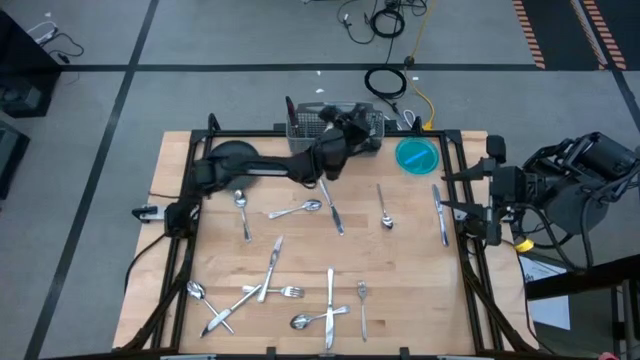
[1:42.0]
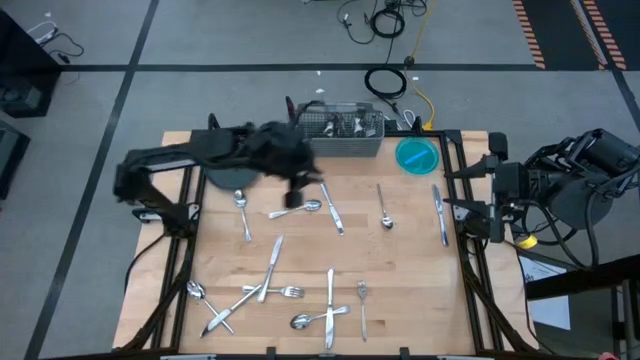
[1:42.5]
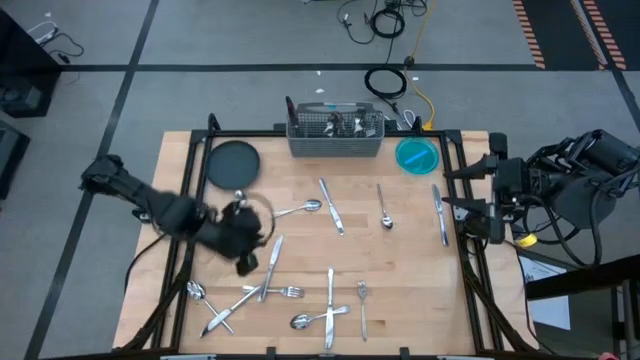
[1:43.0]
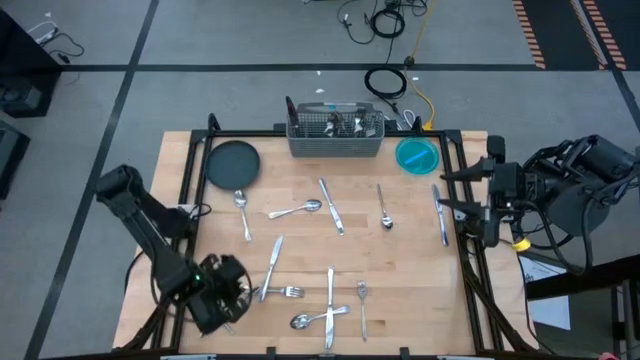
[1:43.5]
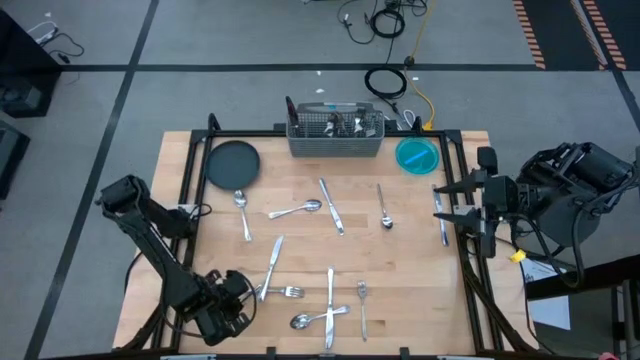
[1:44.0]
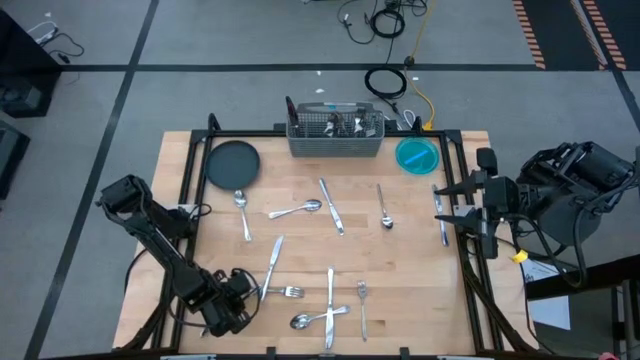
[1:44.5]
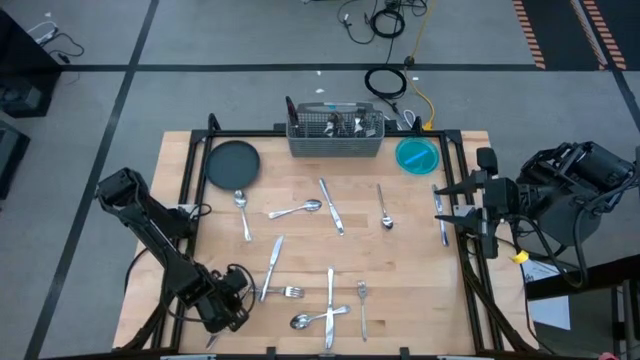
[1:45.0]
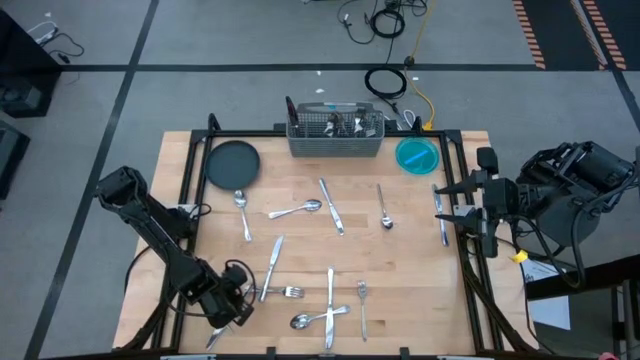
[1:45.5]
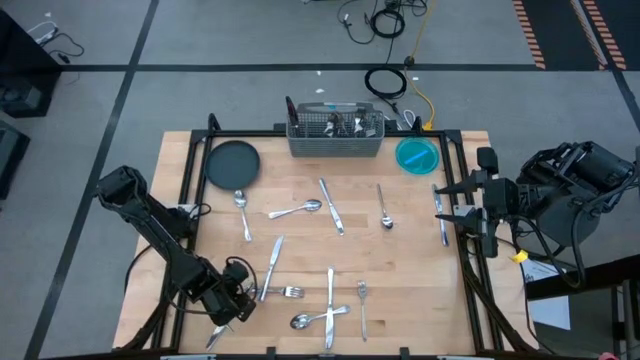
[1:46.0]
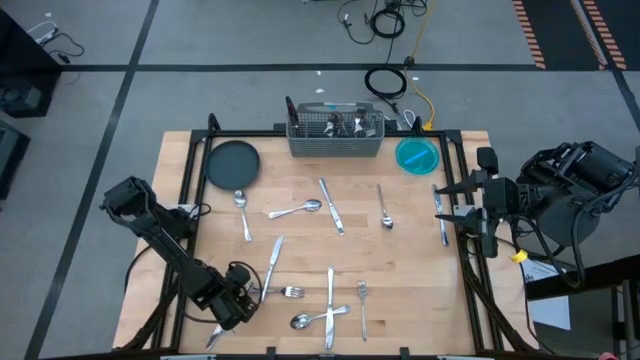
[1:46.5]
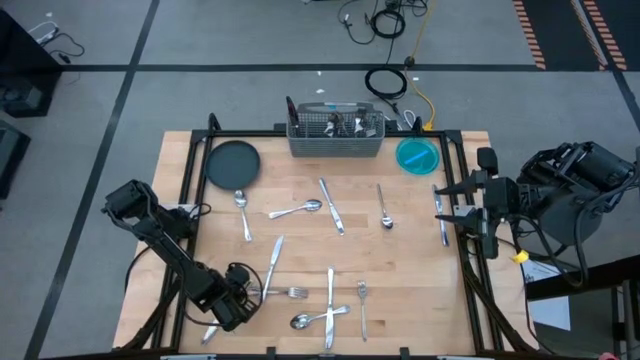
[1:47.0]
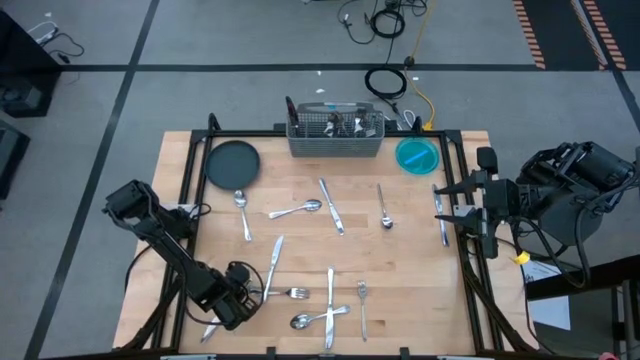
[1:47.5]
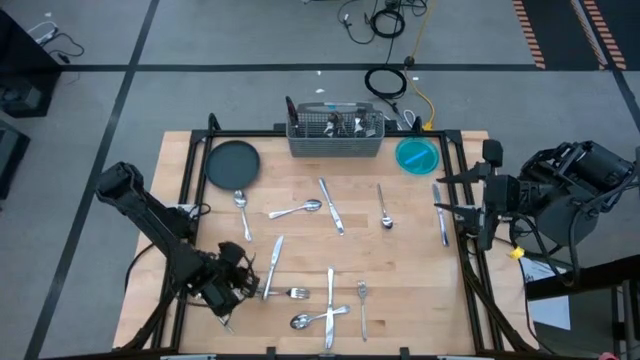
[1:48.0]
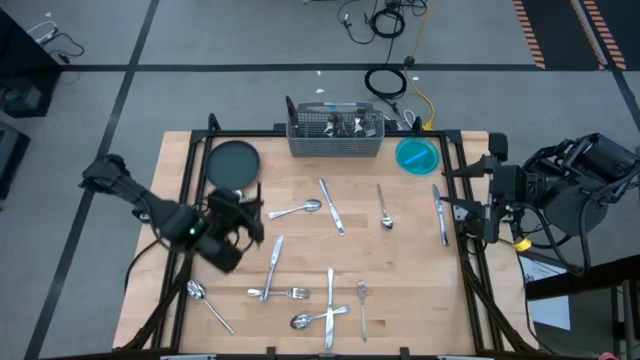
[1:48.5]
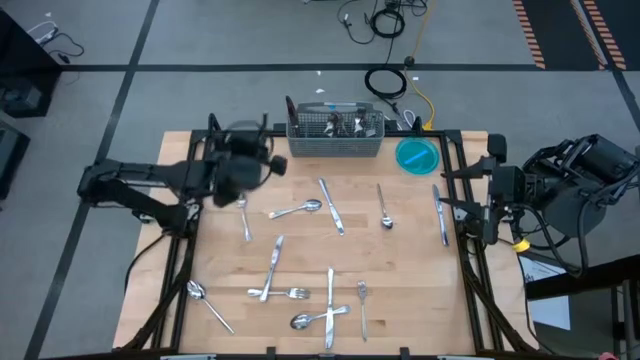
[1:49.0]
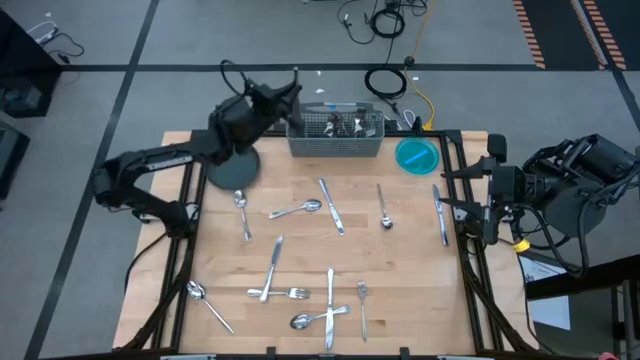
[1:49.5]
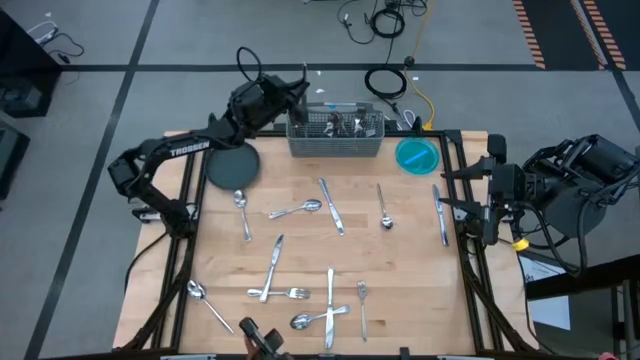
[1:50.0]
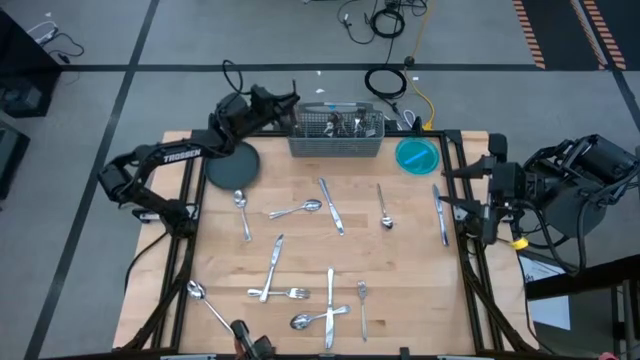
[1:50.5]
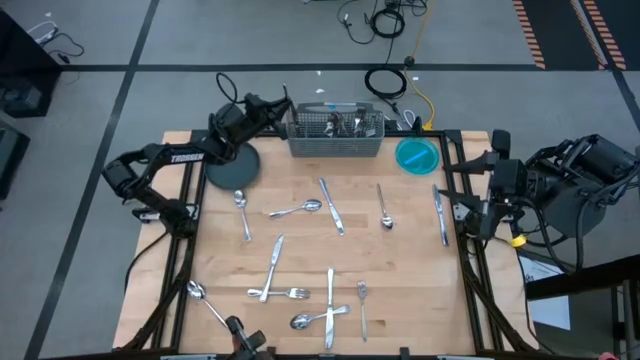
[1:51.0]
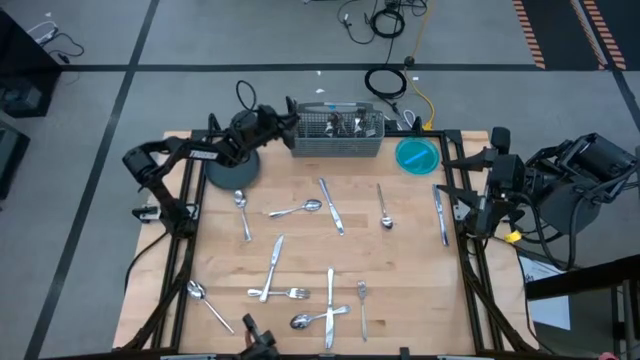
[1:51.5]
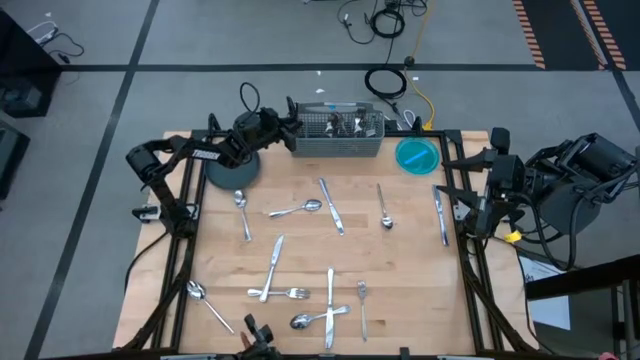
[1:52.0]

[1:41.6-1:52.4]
Task: Sort silverware
Put the table knife into the silverware organizer

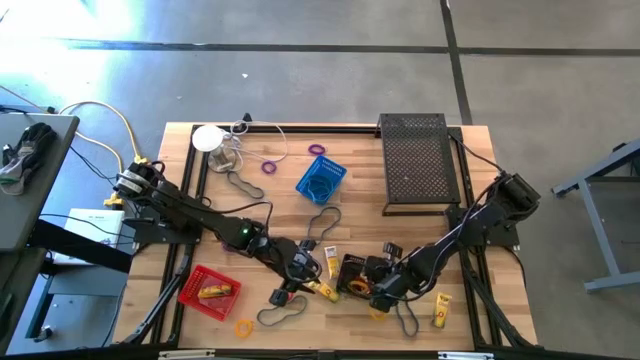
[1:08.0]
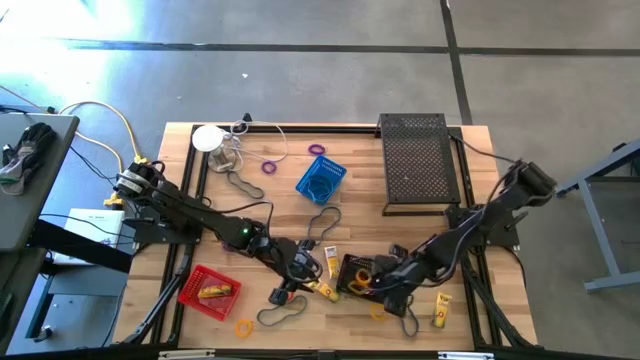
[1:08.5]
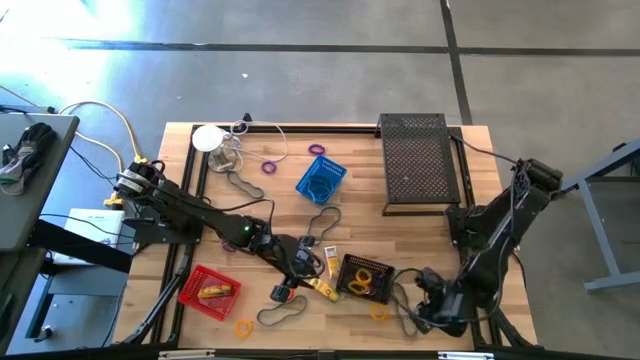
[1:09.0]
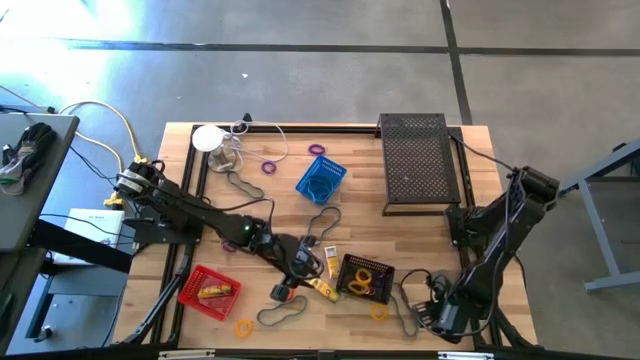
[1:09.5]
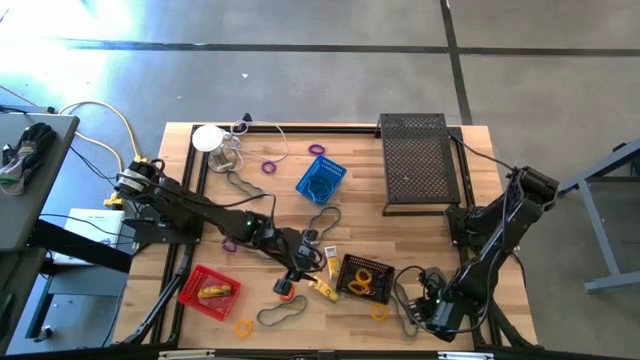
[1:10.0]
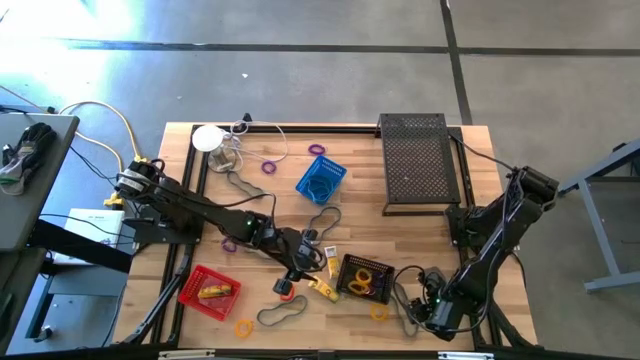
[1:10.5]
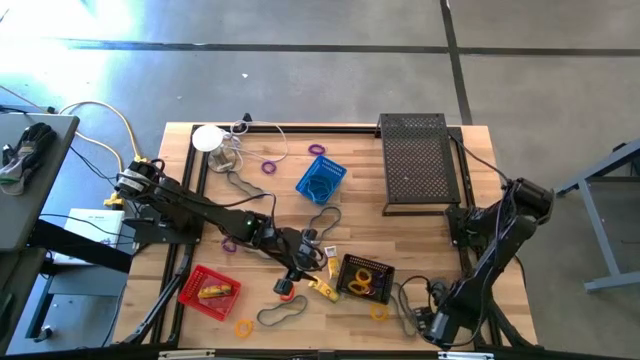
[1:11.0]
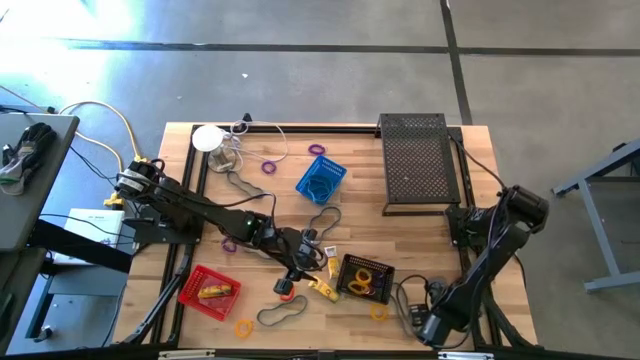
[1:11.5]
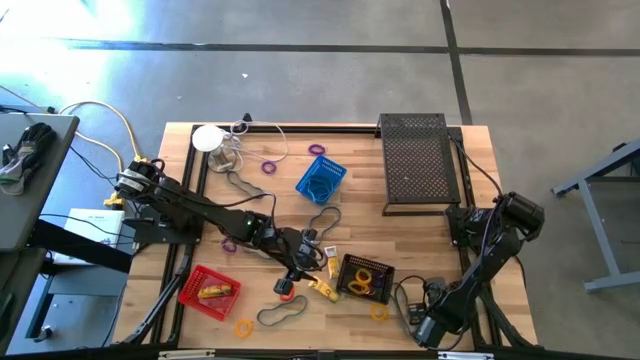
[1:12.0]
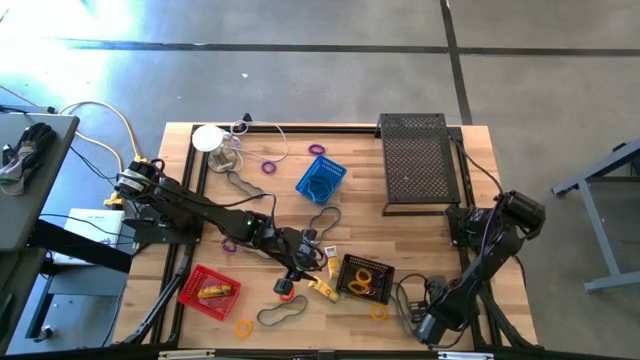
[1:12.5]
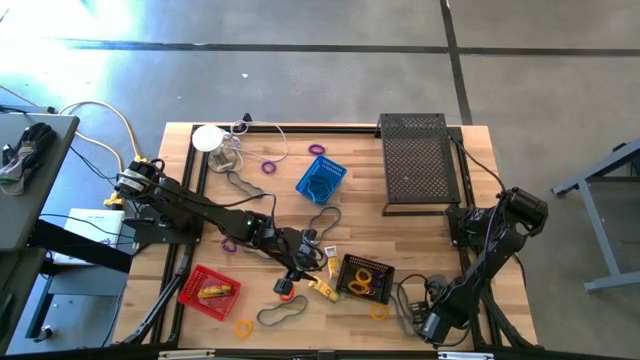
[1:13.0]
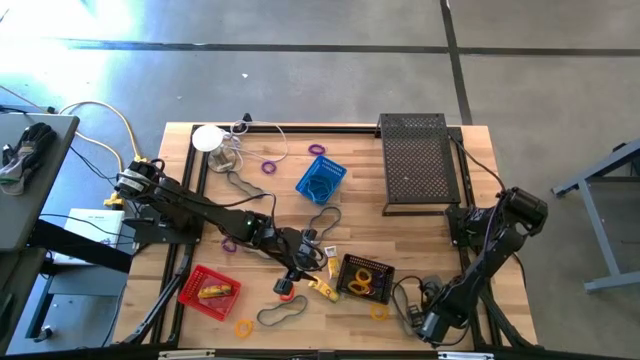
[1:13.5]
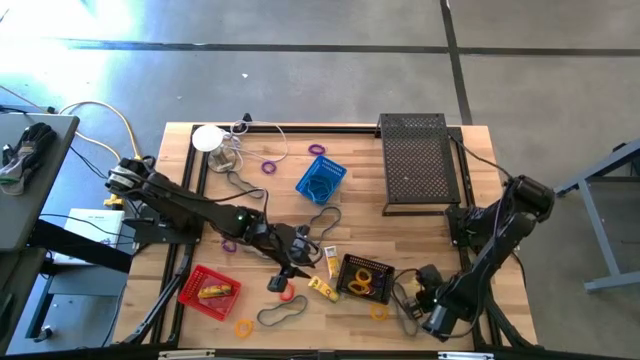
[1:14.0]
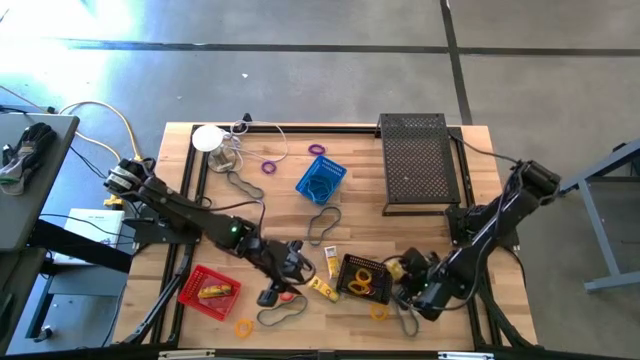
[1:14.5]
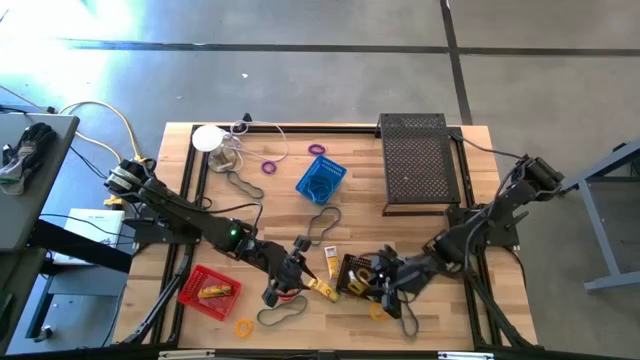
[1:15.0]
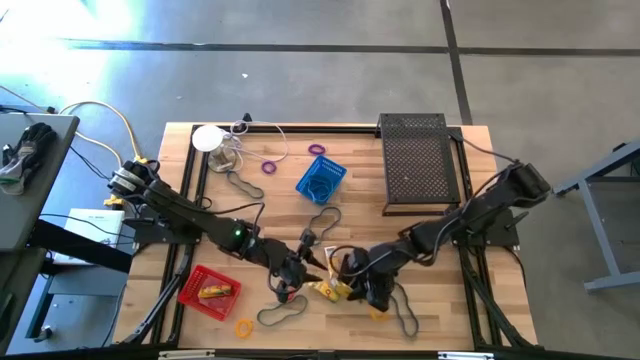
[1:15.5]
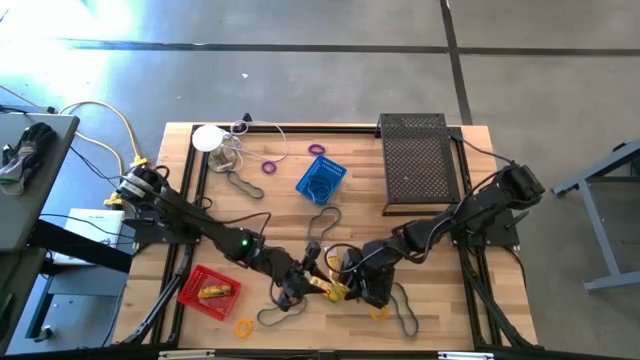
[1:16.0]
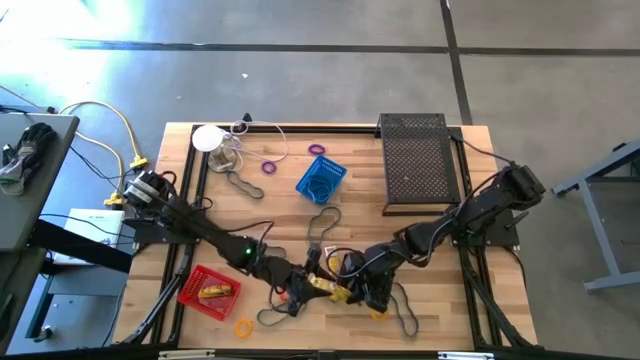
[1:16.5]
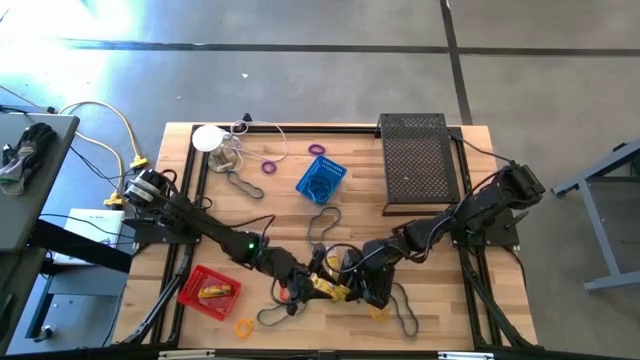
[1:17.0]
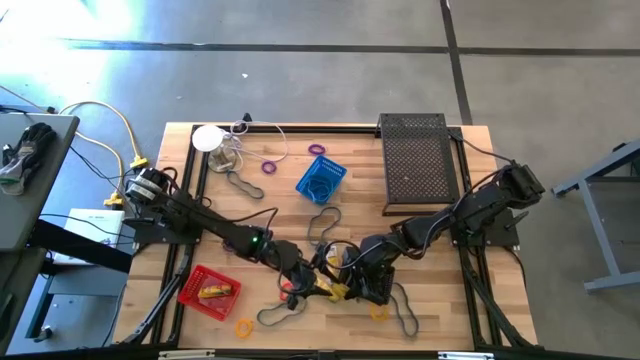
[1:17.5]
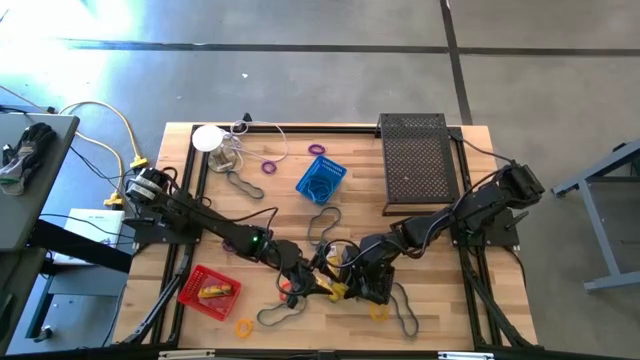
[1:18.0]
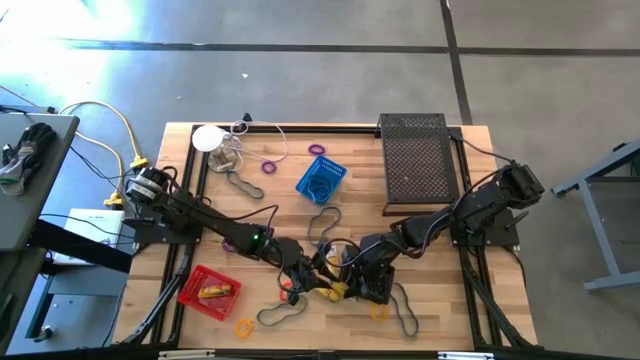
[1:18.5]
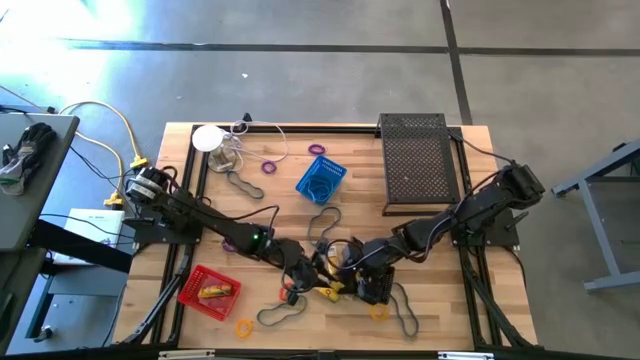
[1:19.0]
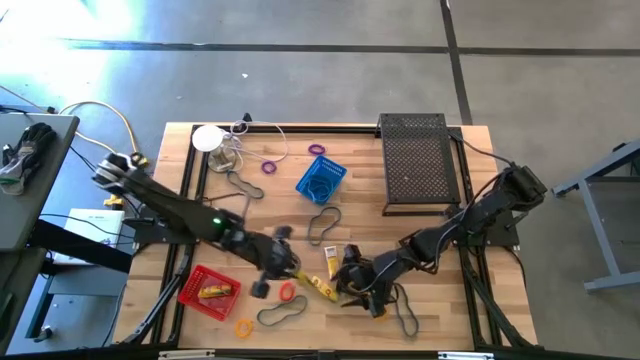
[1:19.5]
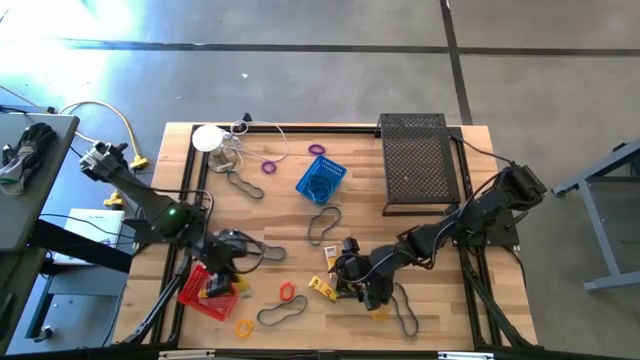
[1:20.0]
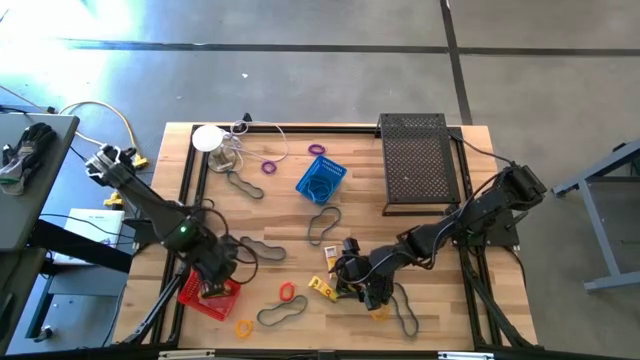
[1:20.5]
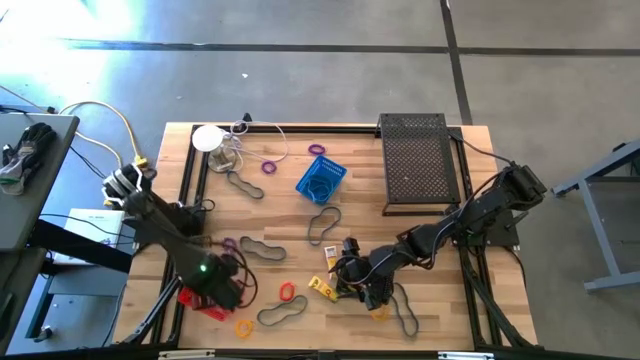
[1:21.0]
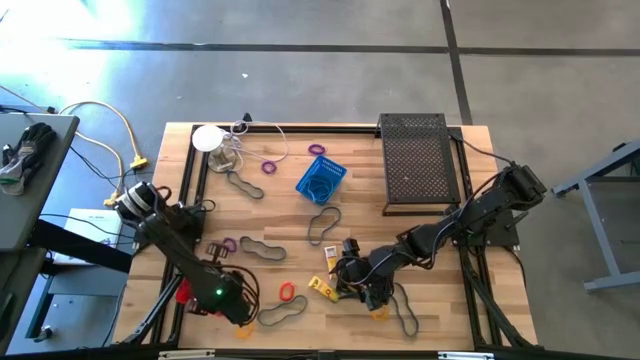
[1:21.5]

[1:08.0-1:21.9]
Task: Pick & Place Office Desk Supplies
Put the bottom crayon box into the red bin
